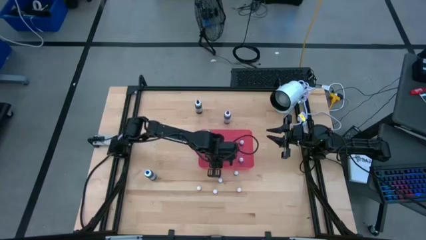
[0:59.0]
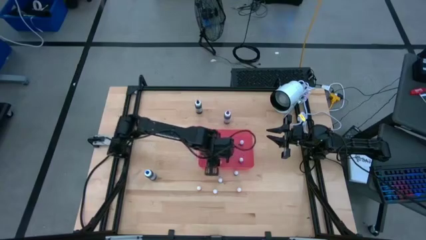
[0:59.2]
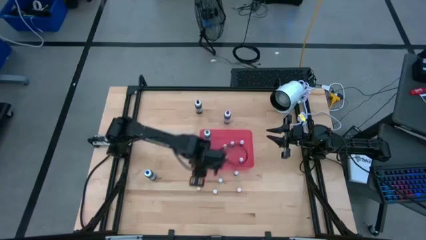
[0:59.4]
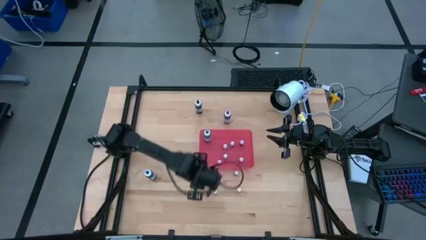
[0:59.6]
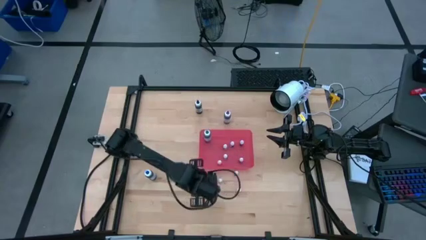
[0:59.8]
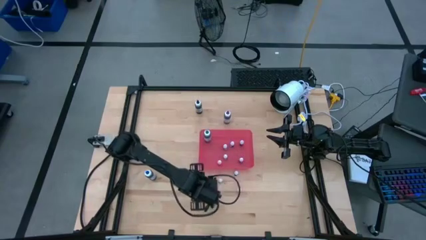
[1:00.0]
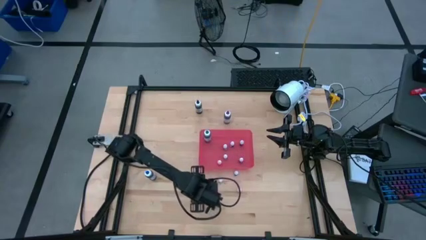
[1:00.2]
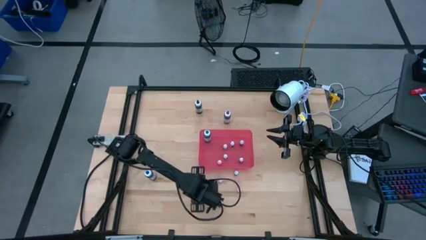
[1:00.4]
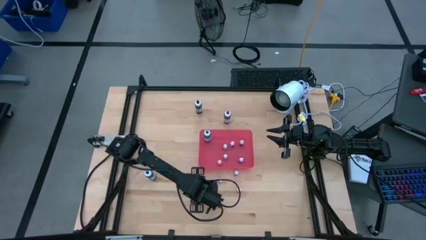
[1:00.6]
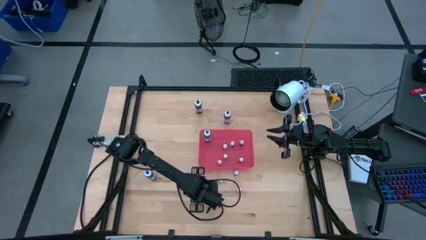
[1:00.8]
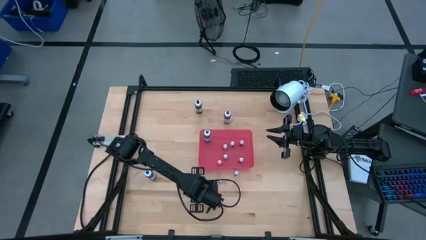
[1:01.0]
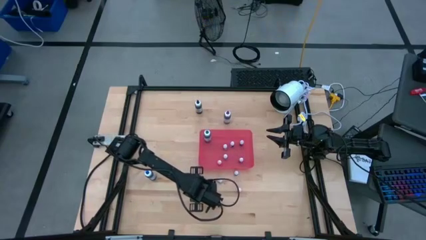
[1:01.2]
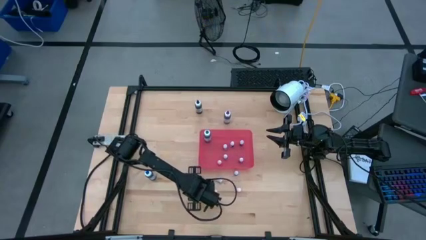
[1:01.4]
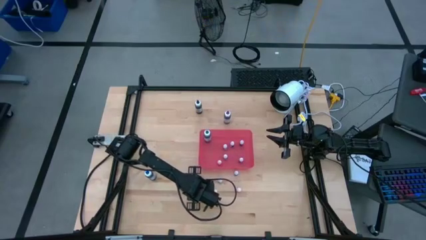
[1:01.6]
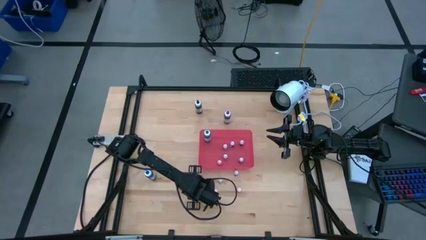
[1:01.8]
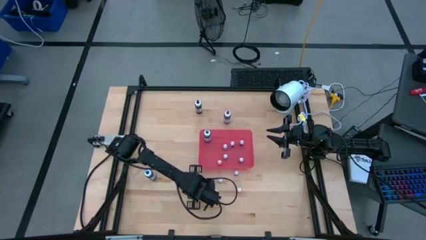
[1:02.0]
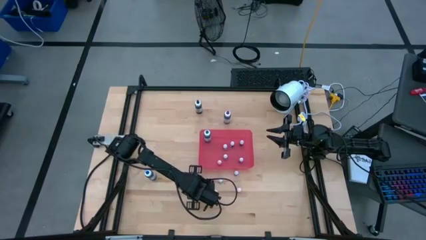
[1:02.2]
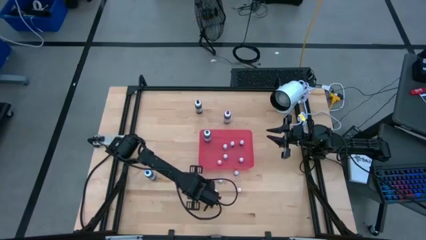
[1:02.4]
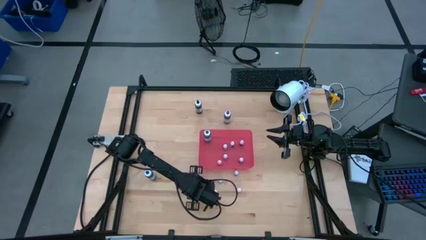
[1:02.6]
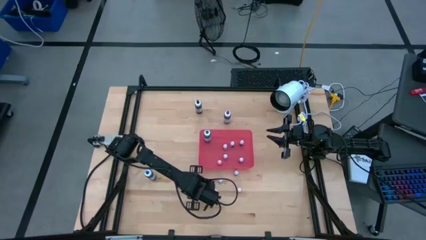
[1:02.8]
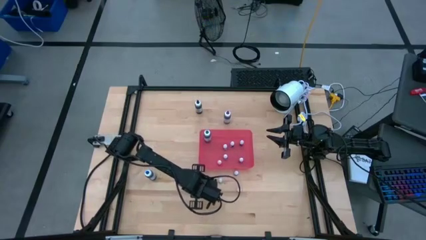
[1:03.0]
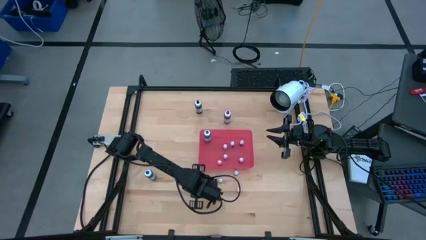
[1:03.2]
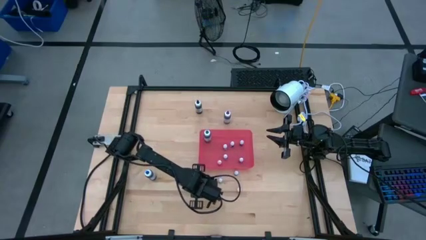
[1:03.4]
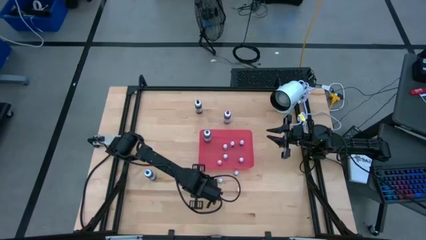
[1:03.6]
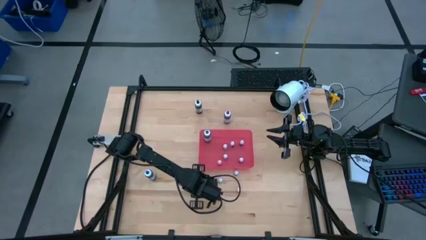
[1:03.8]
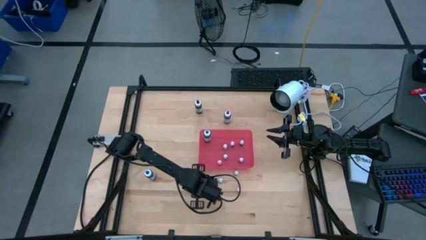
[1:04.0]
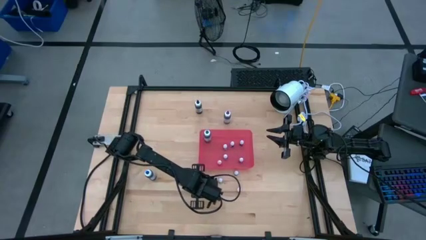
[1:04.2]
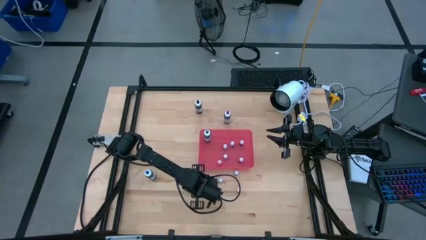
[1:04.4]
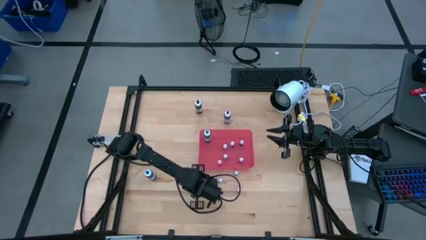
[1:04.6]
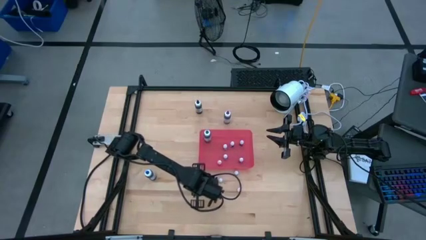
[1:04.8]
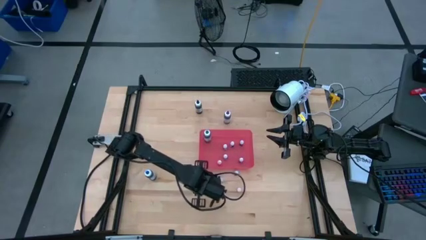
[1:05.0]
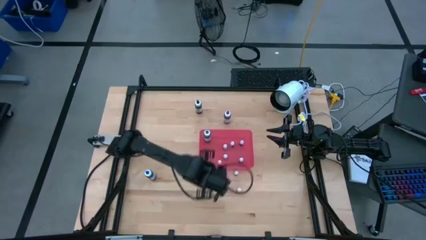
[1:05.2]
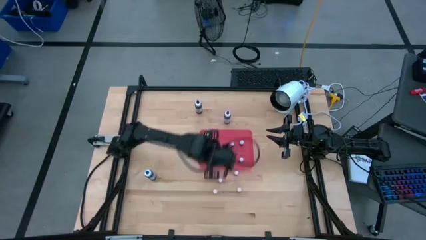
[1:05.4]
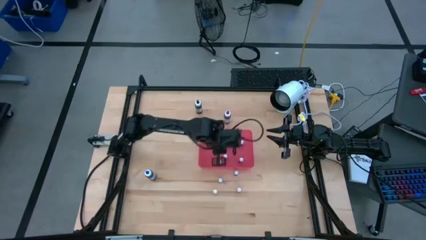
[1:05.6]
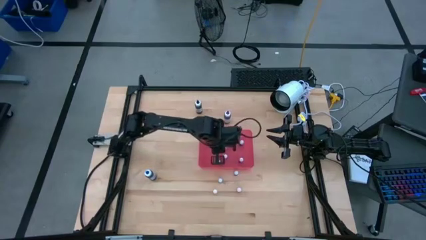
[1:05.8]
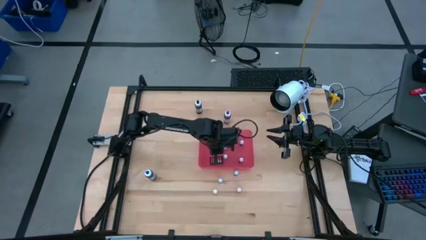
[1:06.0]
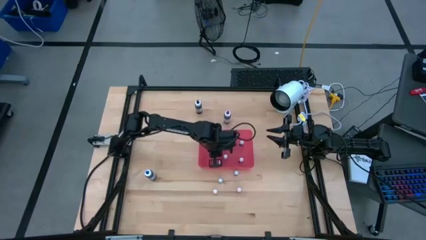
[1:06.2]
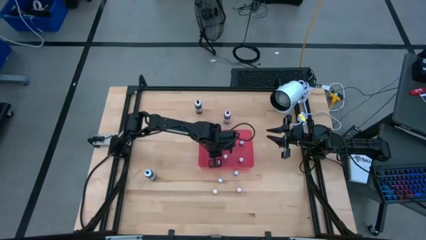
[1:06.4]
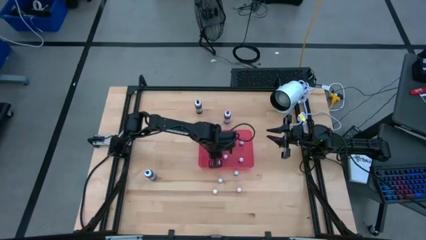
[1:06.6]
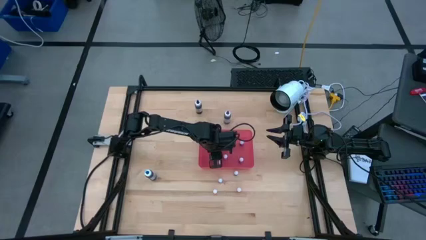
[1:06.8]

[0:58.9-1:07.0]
Task: Pick & Place food coloring
Put the small yellow food coloring bottle into the red bin

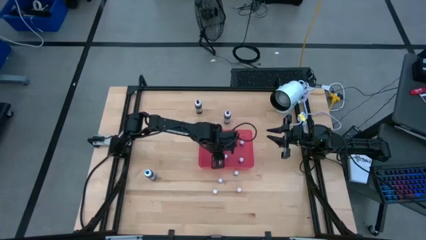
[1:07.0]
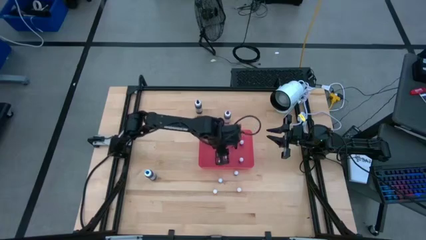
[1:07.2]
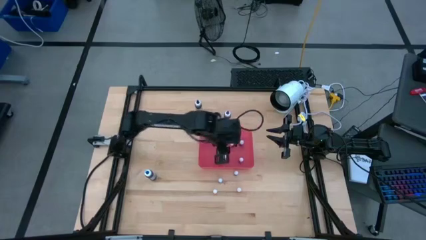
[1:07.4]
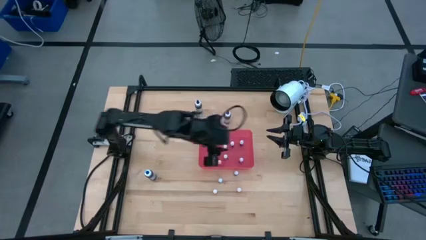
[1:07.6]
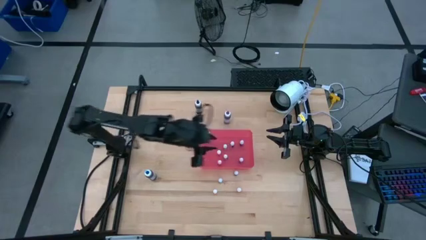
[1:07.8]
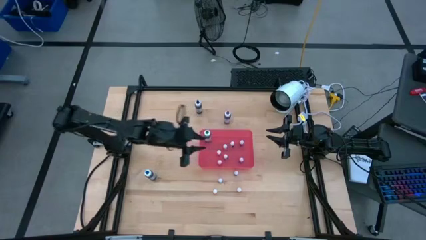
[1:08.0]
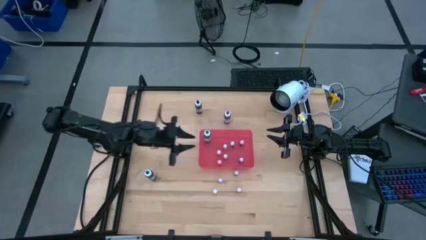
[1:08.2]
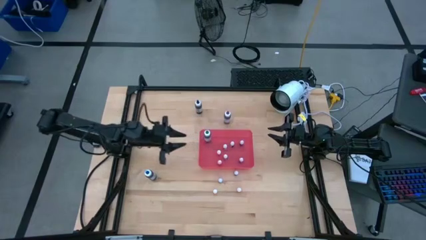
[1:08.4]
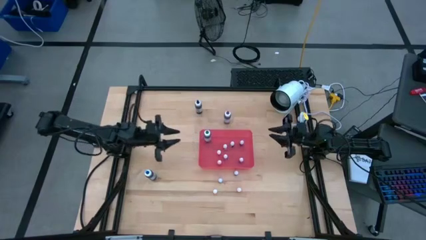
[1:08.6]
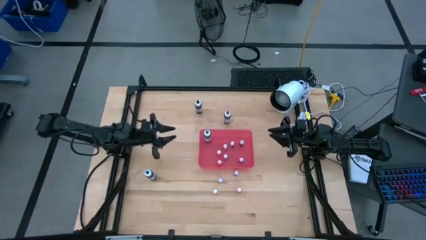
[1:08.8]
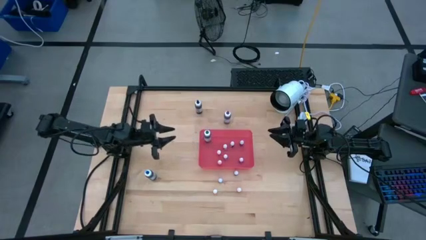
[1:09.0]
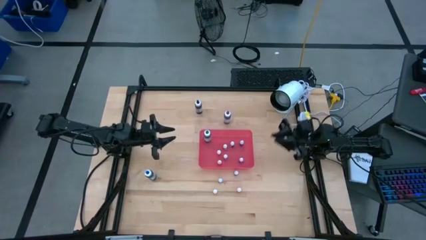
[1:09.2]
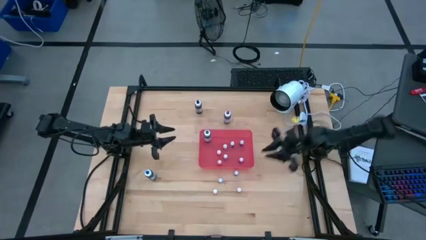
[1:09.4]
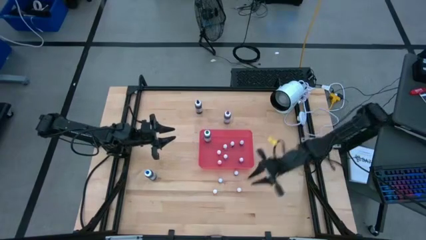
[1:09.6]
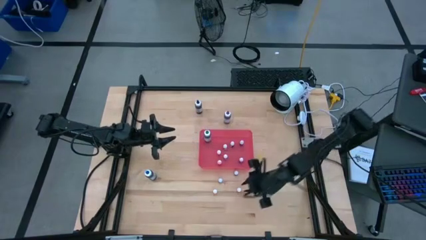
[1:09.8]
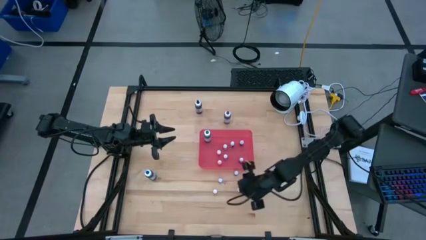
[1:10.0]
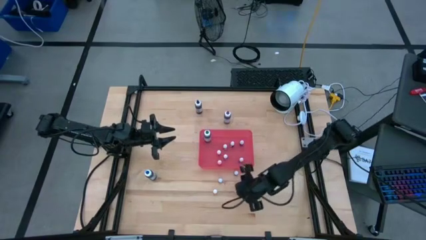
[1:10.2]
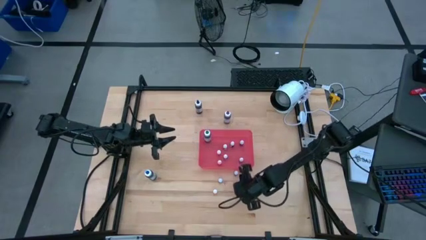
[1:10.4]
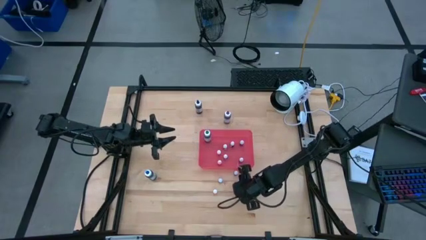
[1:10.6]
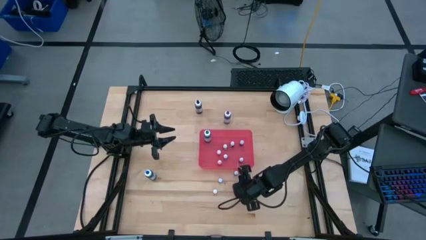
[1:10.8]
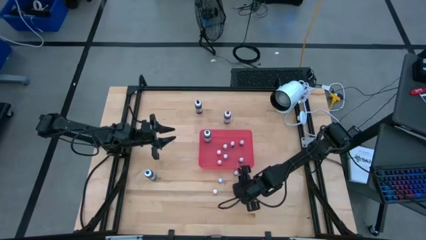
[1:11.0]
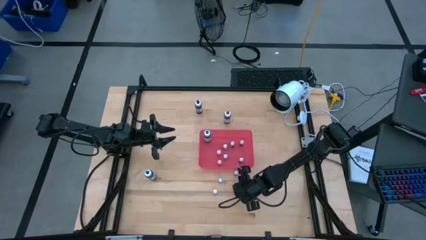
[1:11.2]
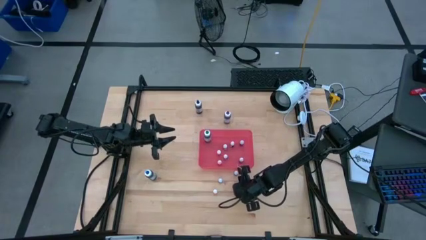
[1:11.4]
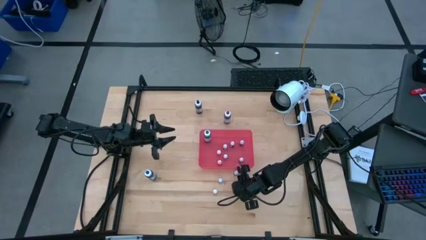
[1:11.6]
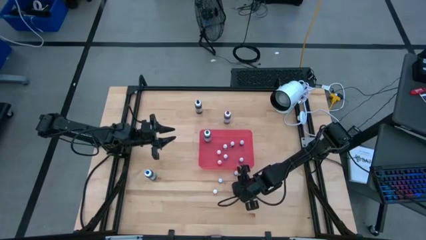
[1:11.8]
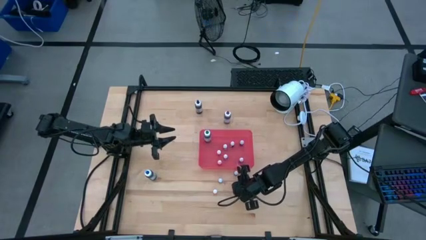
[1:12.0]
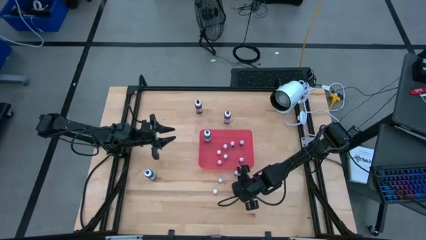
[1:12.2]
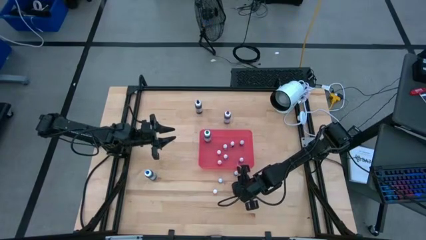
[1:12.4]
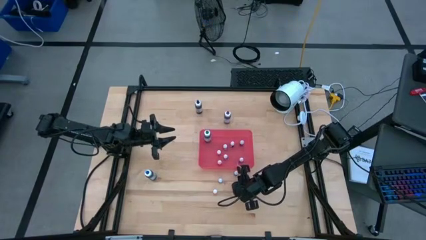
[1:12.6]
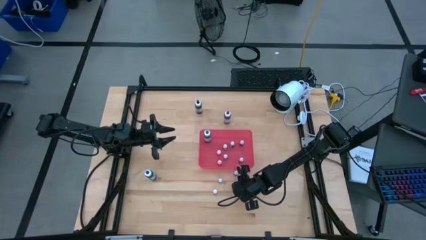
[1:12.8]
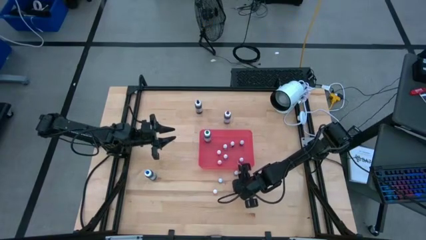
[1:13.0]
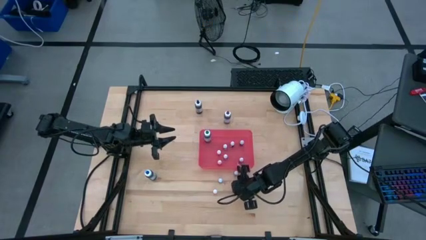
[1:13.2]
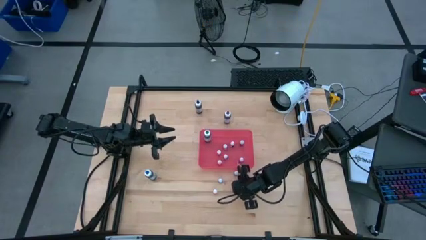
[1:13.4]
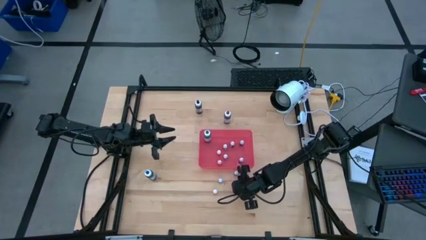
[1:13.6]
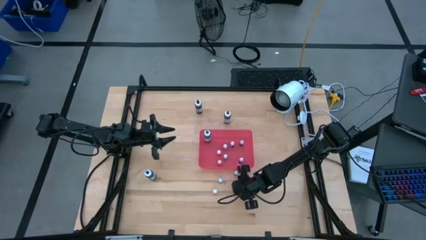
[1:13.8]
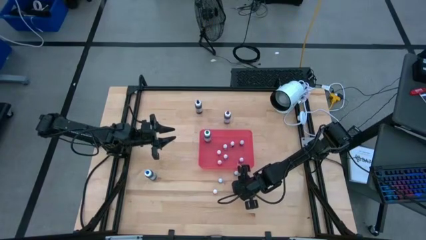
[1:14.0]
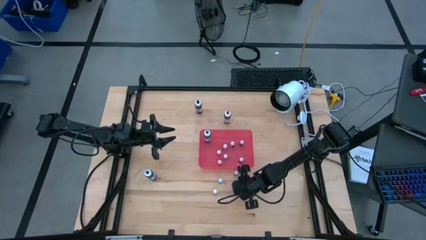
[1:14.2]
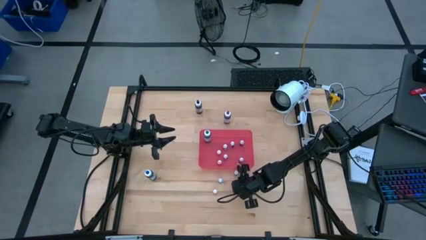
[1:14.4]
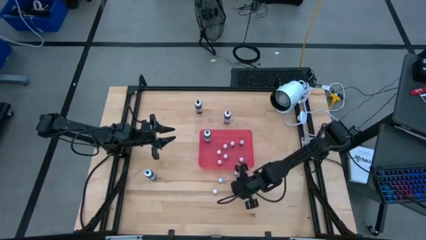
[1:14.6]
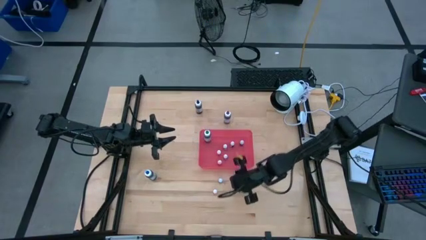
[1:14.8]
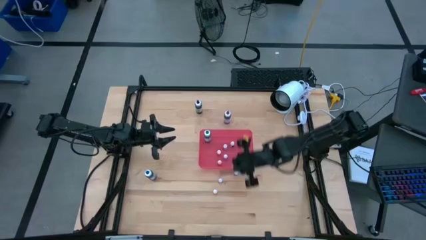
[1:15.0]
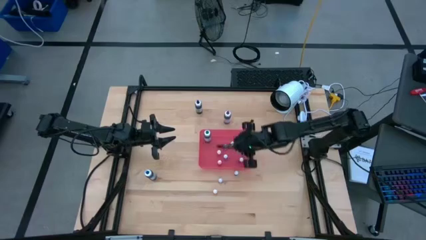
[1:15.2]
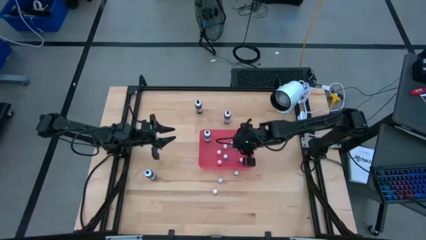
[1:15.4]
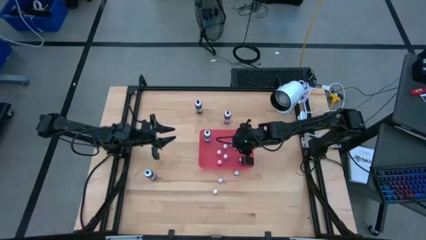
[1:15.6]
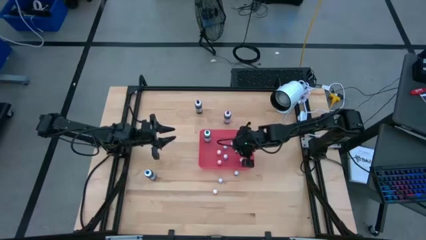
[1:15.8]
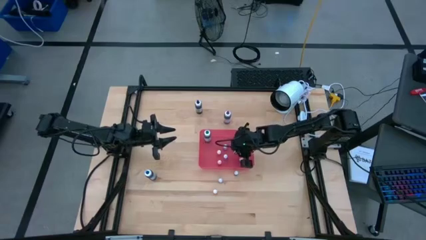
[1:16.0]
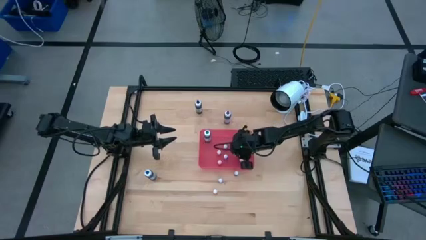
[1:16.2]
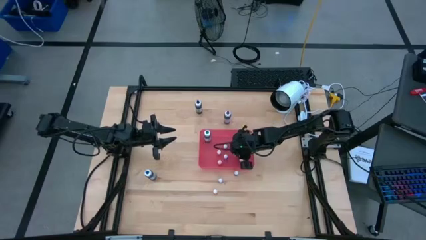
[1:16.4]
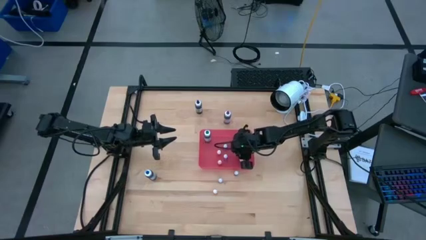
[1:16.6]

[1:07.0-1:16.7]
Put the small yellow food coloring bottle into the red bin
